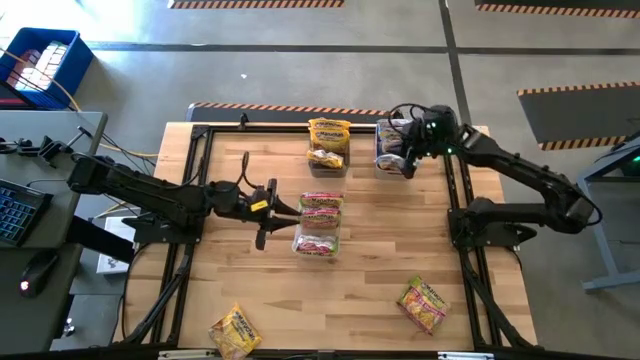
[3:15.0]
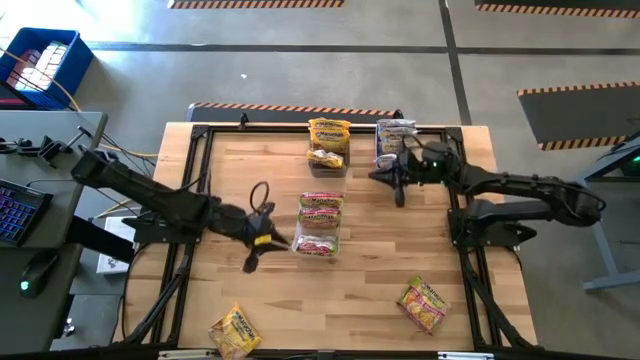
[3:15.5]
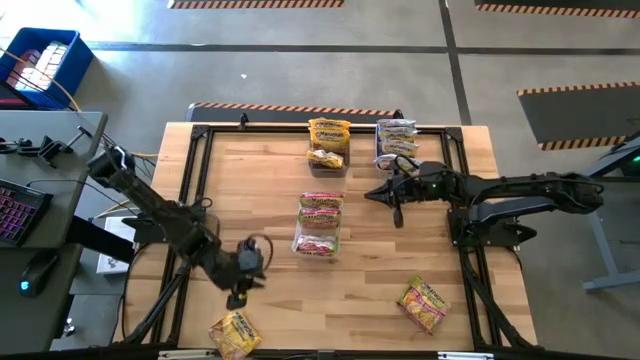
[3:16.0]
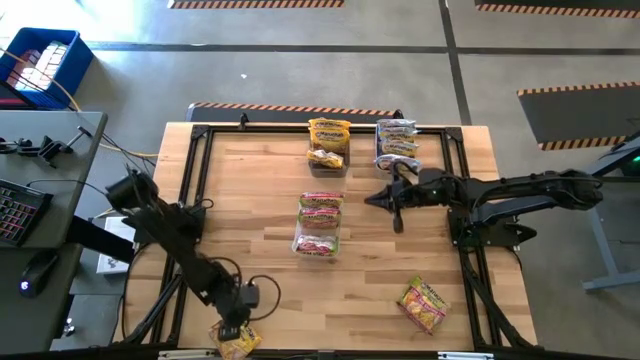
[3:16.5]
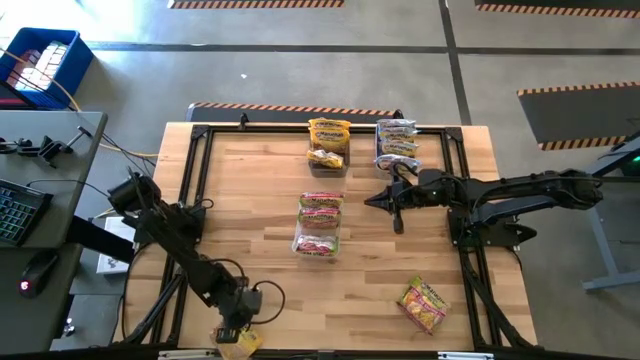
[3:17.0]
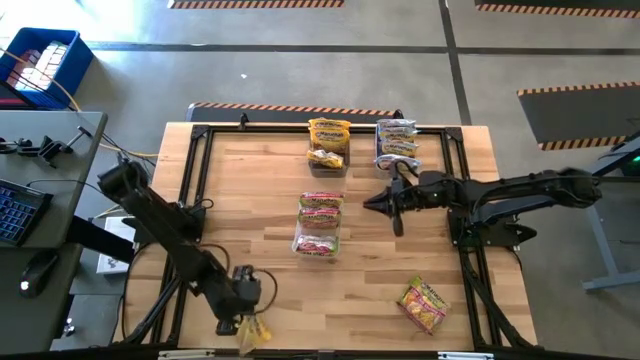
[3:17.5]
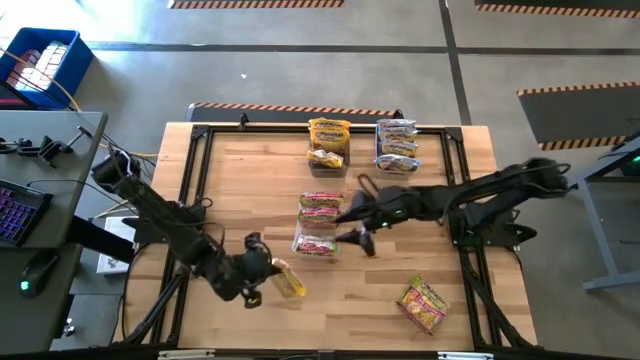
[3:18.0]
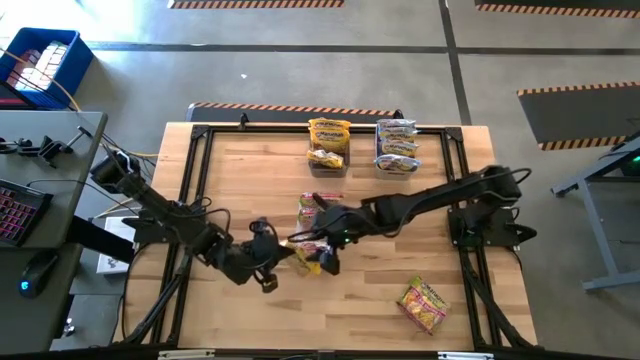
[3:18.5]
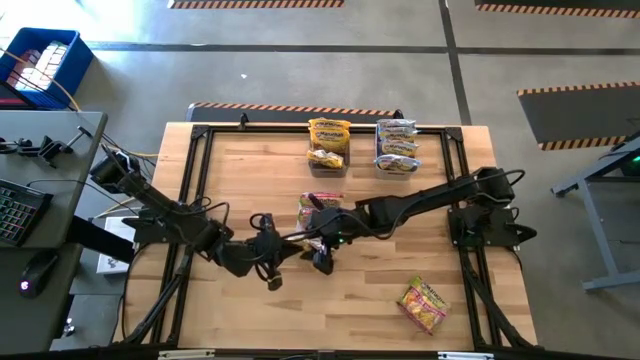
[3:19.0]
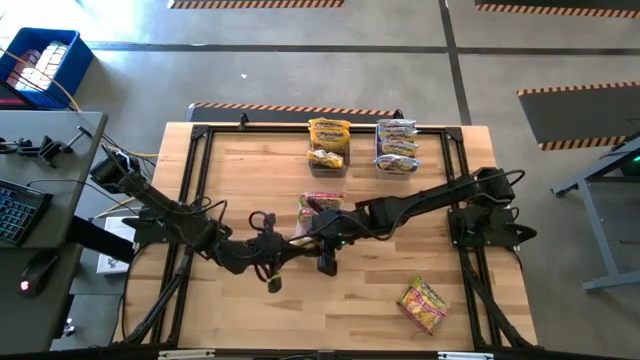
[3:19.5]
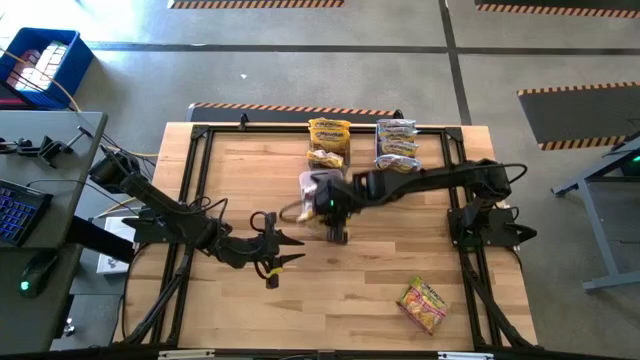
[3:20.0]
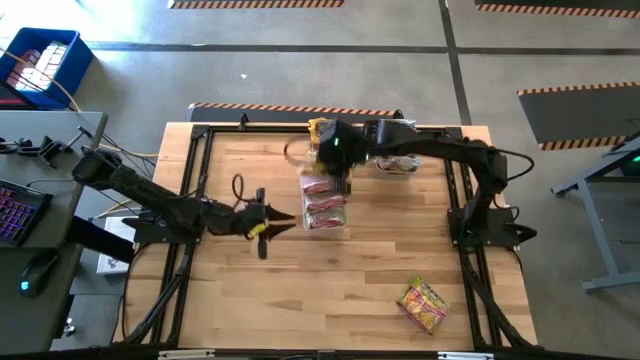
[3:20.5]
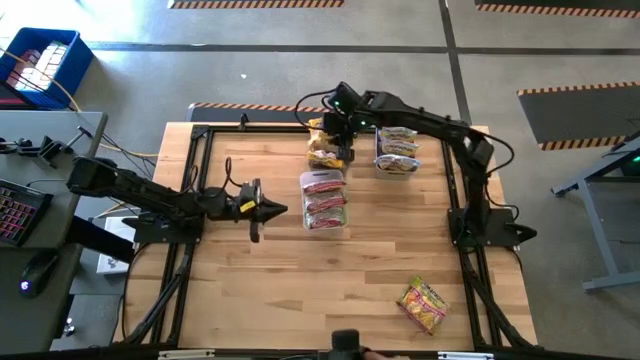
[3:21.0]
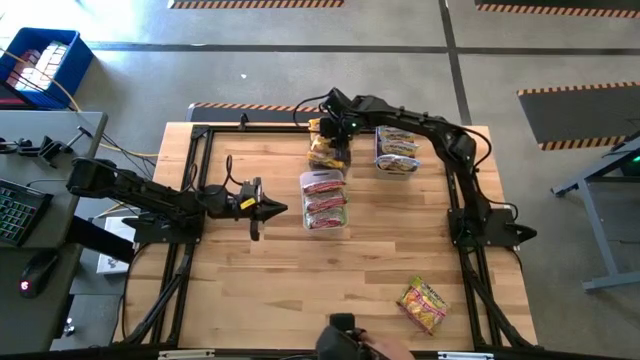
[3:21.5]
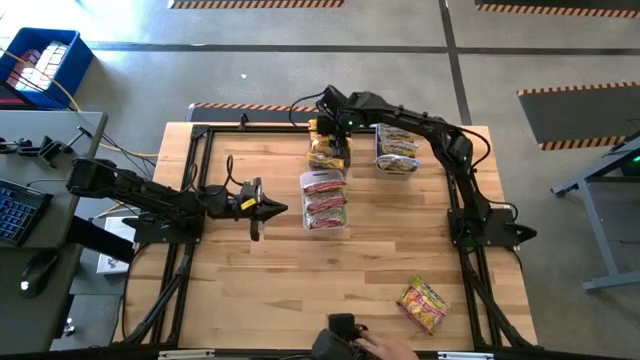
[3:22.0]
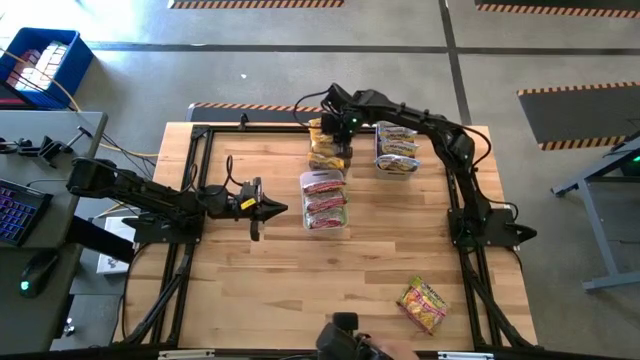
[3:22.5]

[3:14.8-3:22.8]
Task: Sort Maruchan noodles
Put the yellow noodle pack into the black bin

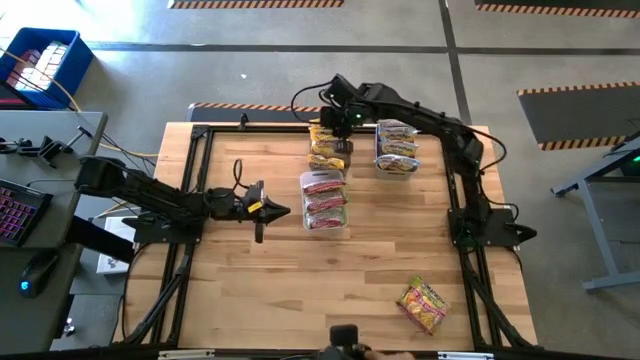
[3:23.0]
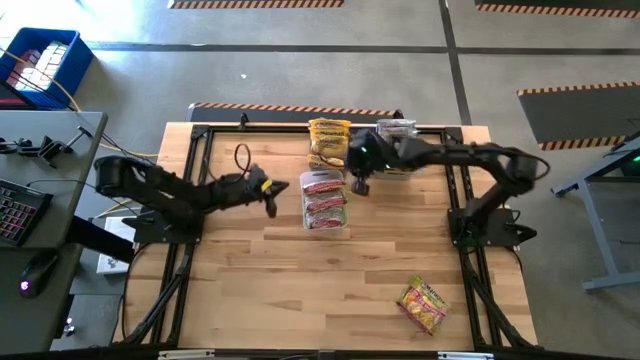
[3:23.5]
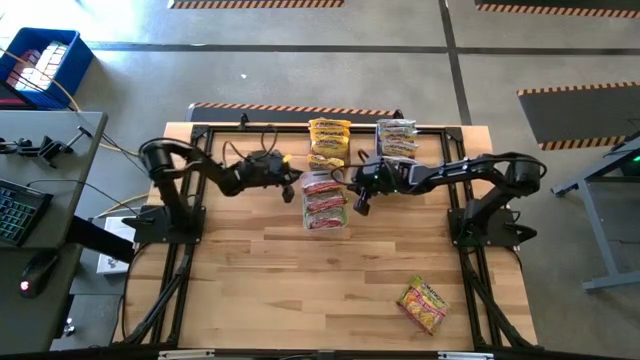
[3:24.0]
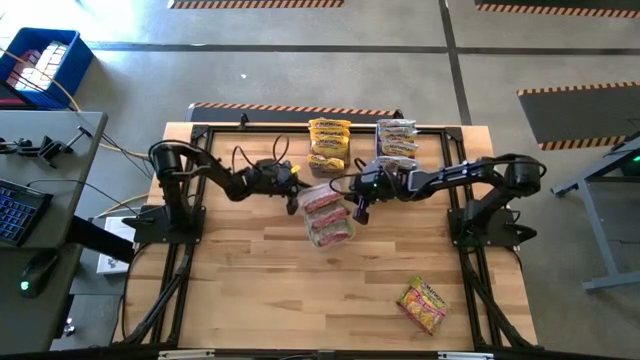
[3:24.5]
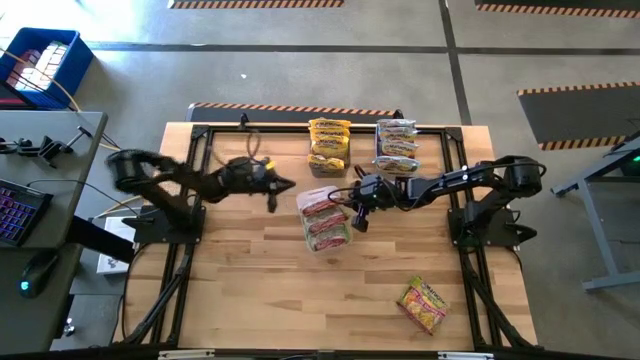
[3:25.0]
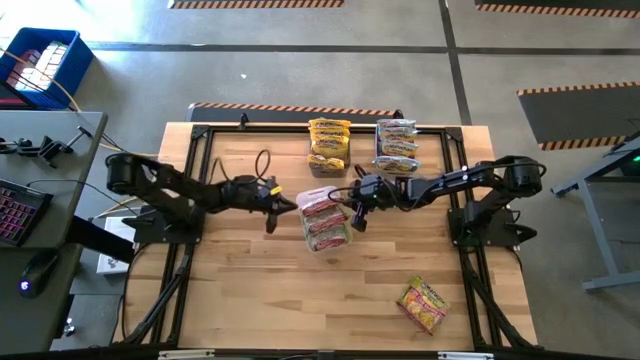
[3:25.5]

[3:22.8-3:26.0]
Adjust the transparent bin

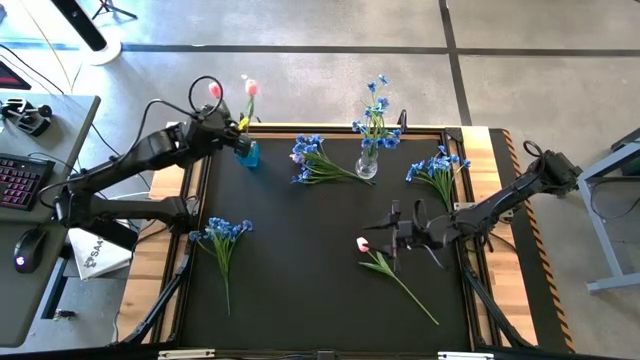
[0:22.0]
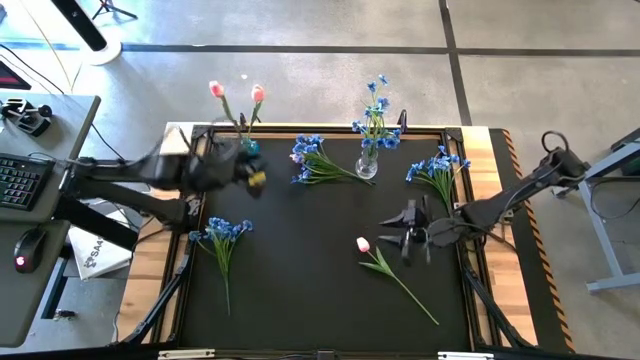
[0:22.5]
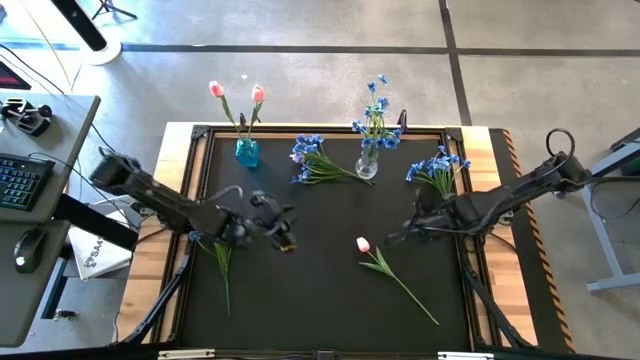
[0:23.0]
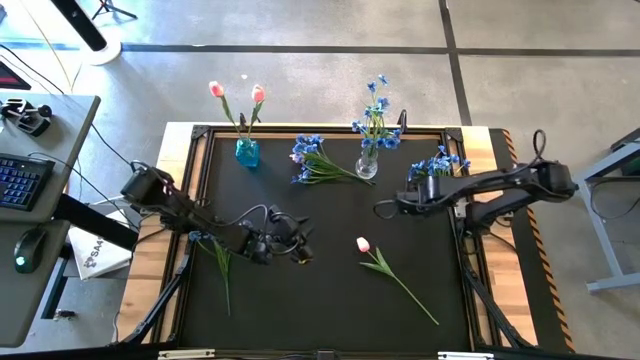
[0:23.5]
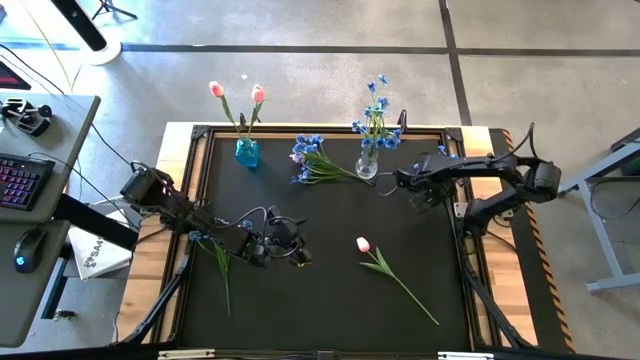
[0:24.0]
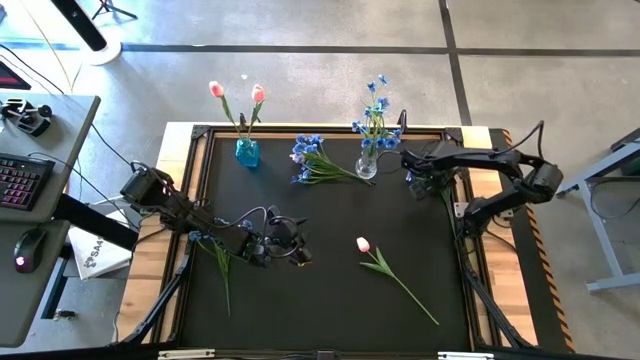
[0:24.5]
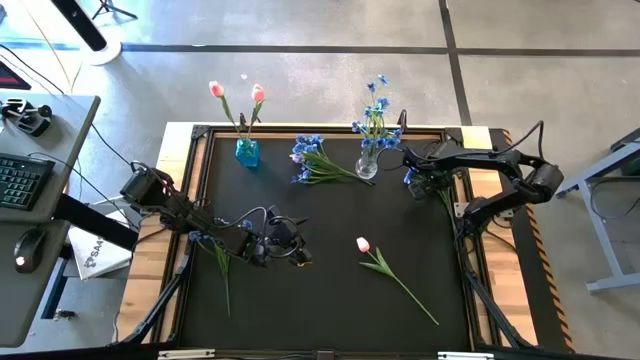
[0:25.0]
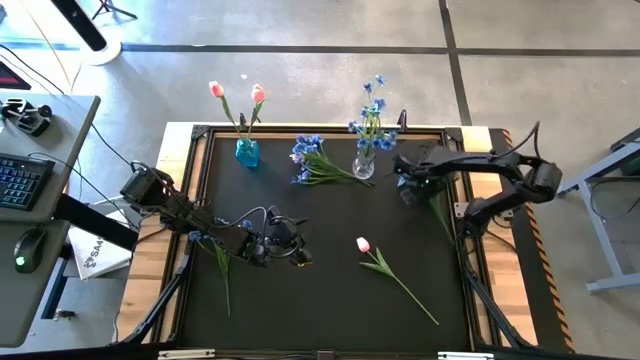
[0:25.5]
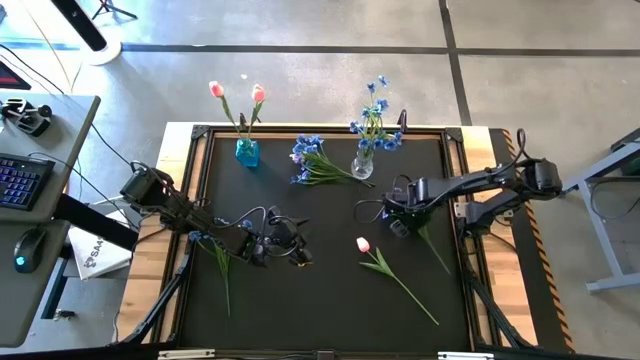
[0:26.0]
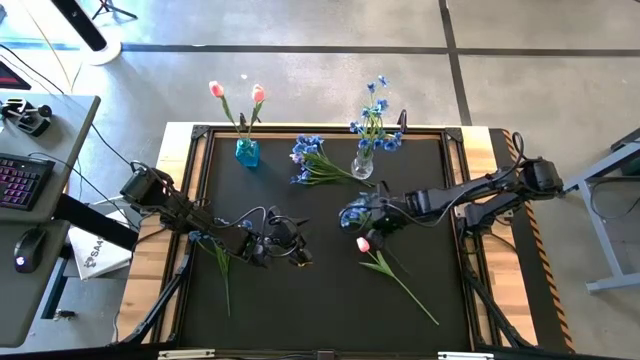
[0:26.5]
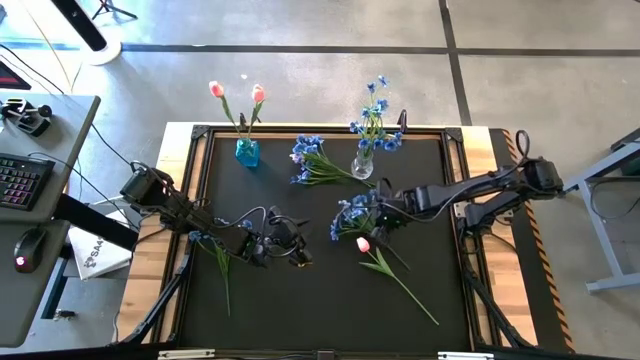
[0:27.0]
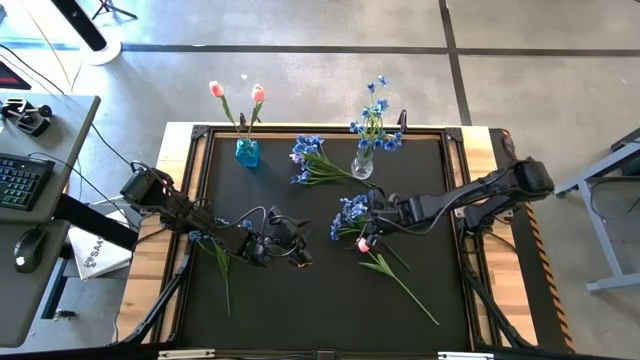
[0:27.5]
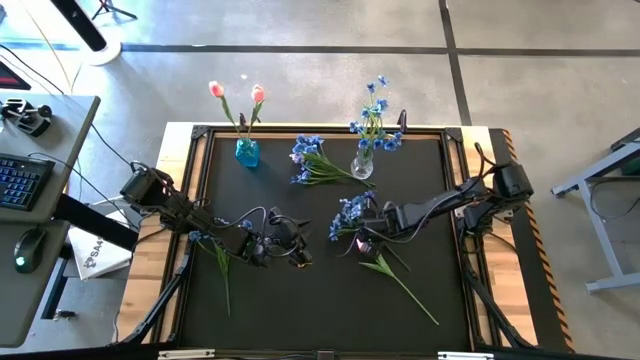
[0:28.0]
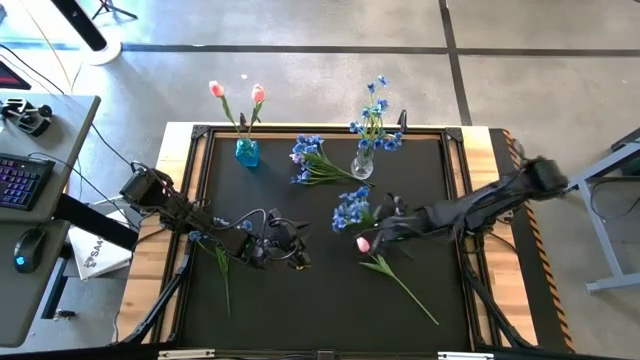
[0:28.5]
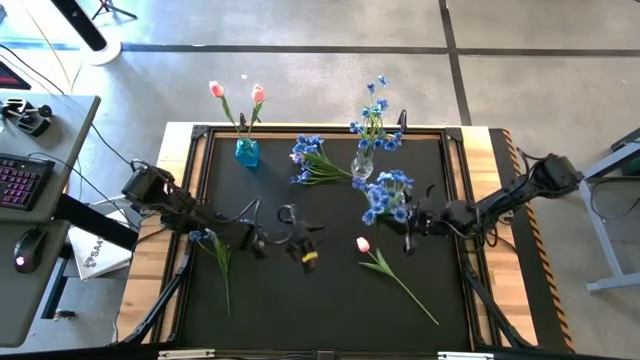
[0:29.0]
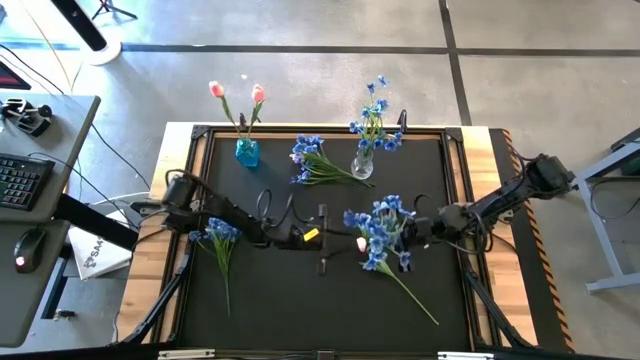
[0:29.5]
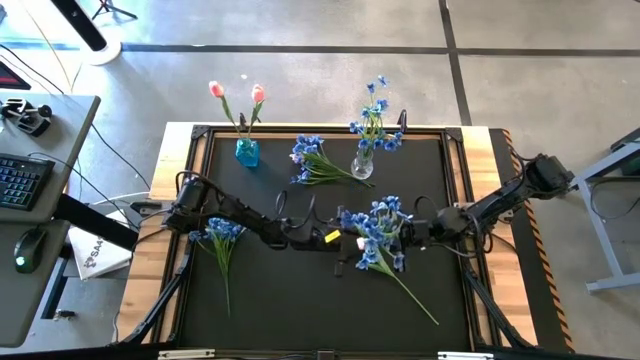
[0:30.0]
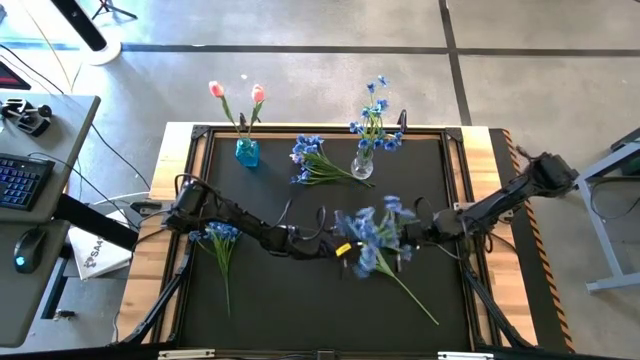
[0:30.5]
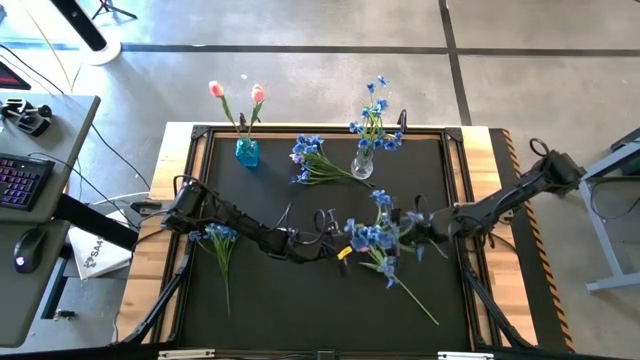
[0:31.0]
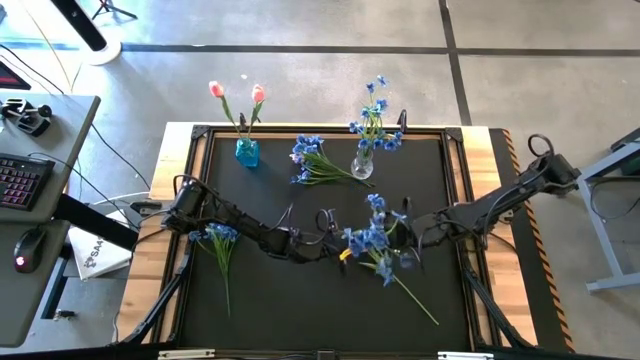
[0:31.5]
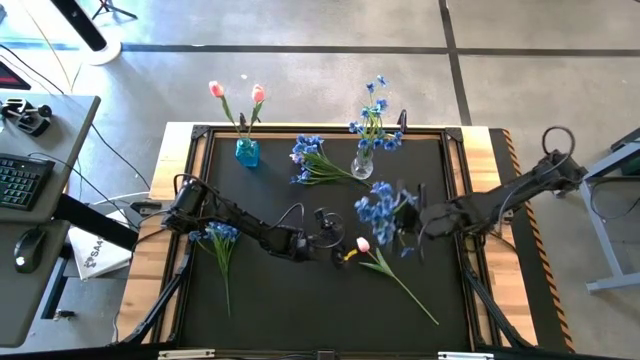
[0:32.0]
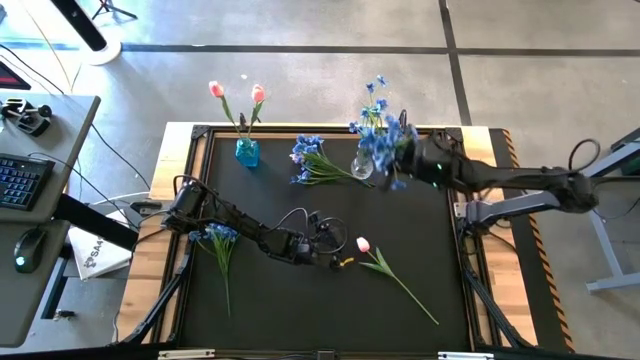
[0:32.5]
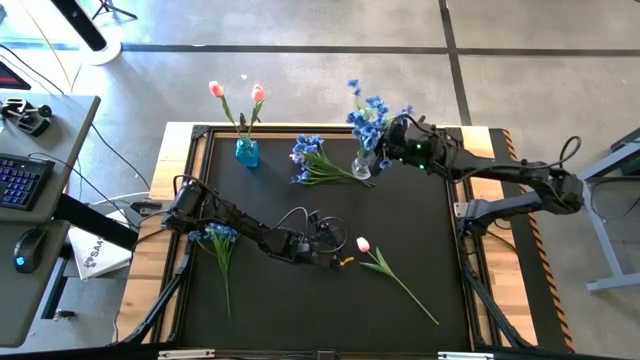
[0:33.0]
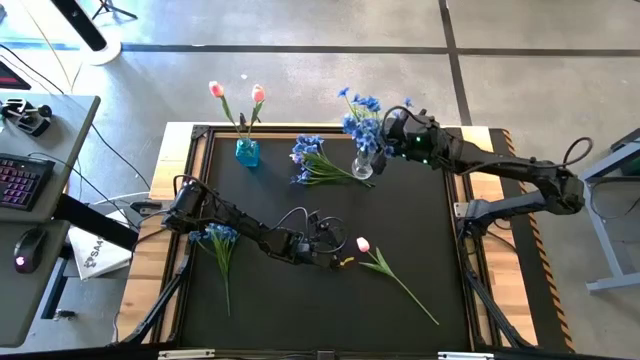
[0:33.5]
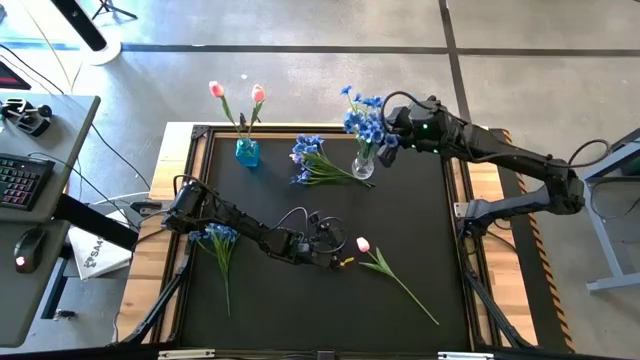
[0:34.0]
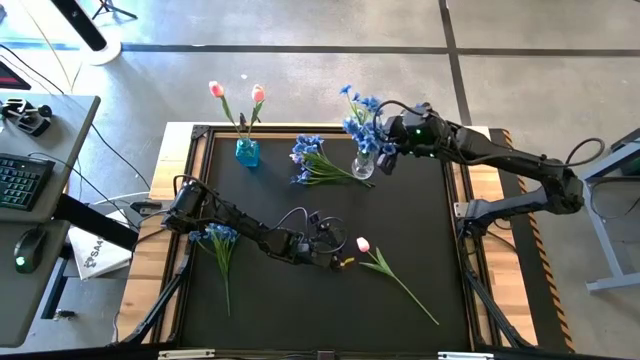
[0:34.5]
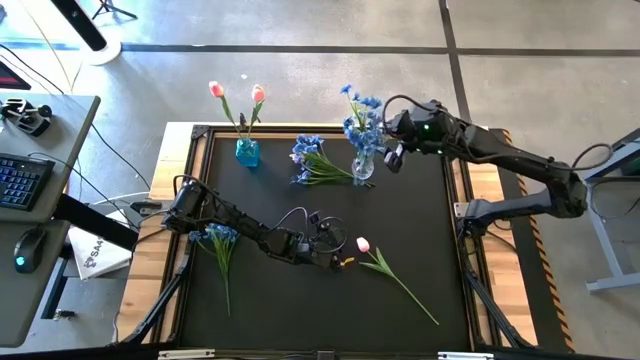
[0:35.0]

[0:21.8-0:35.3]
Task: Sort flowers into vase by color
Put the blue flowers into the transparent flower vase
